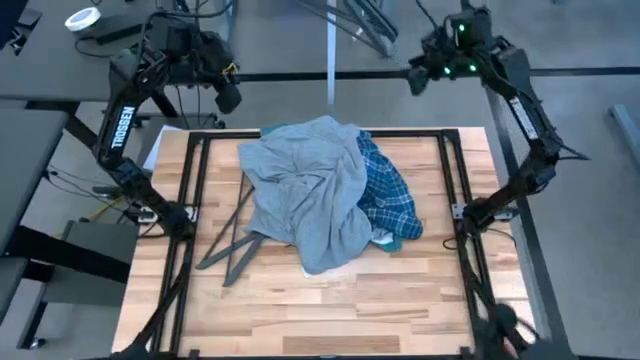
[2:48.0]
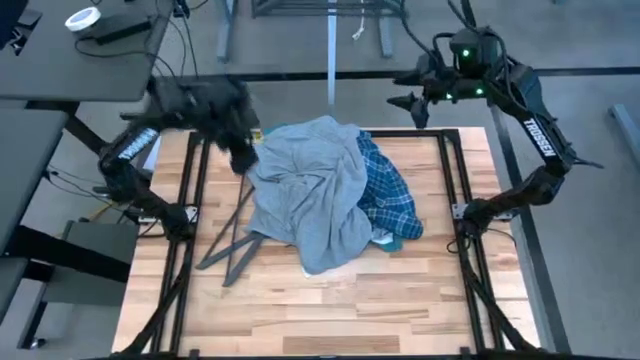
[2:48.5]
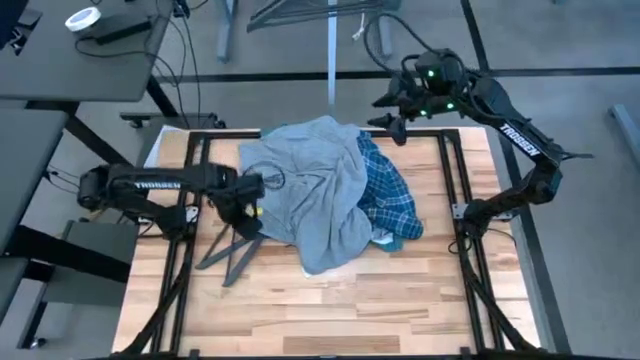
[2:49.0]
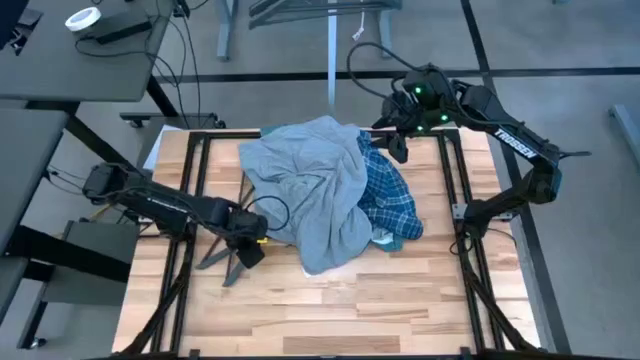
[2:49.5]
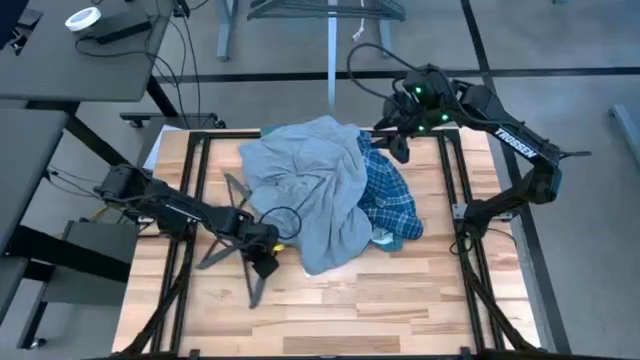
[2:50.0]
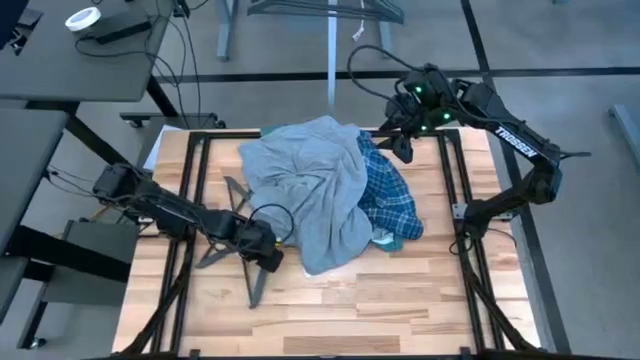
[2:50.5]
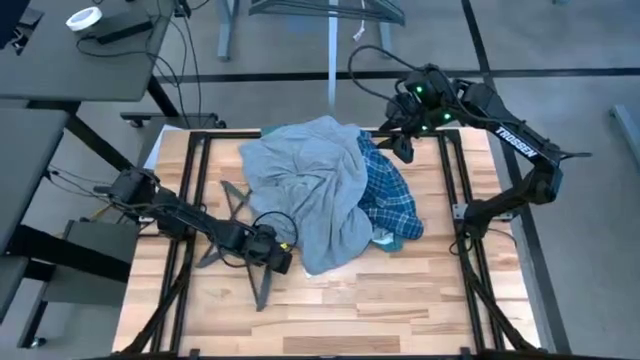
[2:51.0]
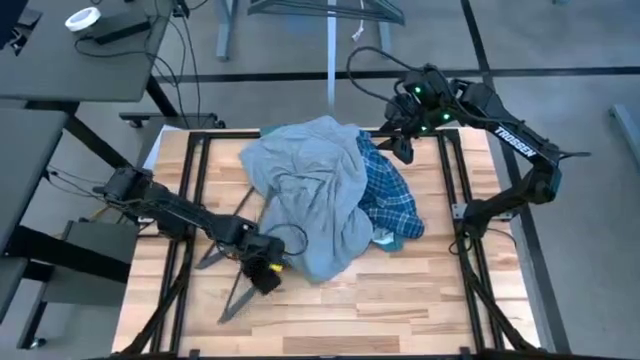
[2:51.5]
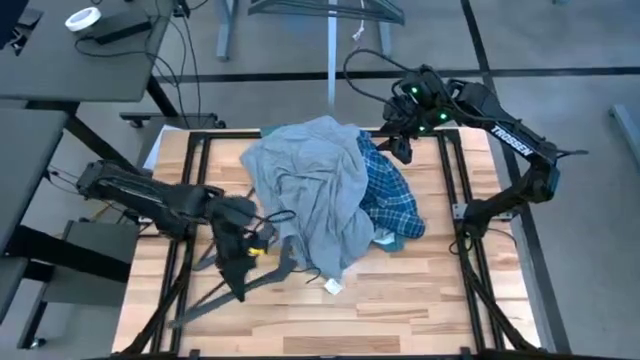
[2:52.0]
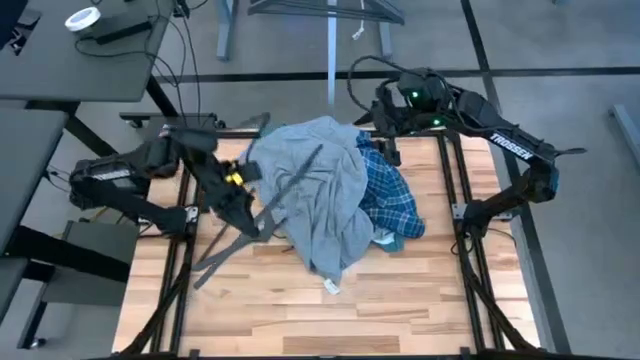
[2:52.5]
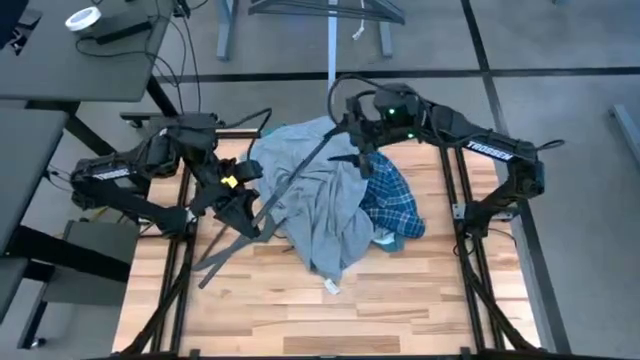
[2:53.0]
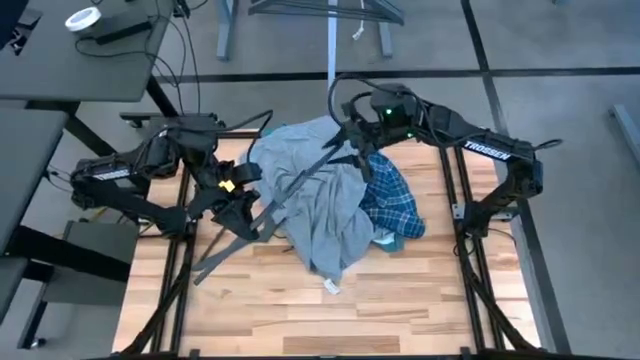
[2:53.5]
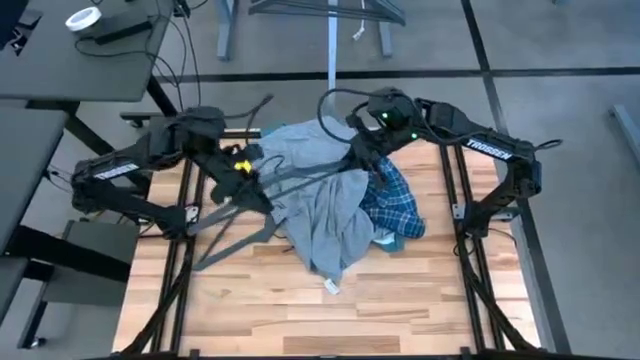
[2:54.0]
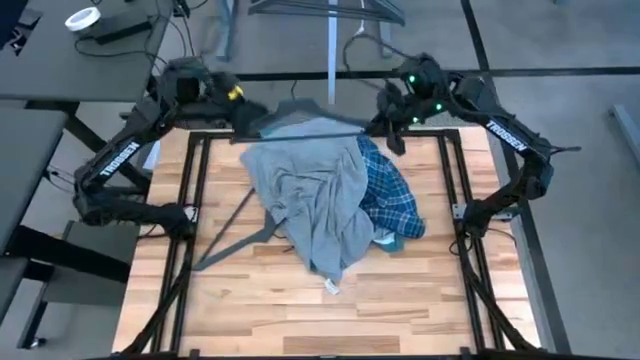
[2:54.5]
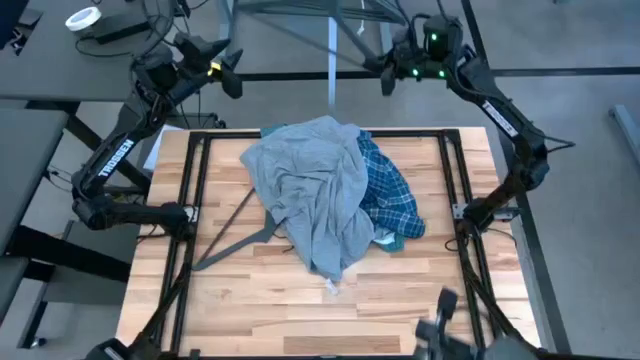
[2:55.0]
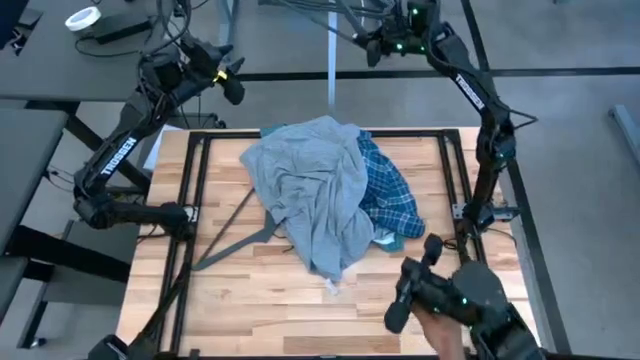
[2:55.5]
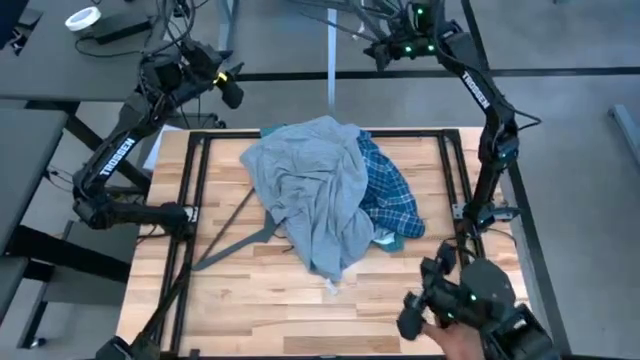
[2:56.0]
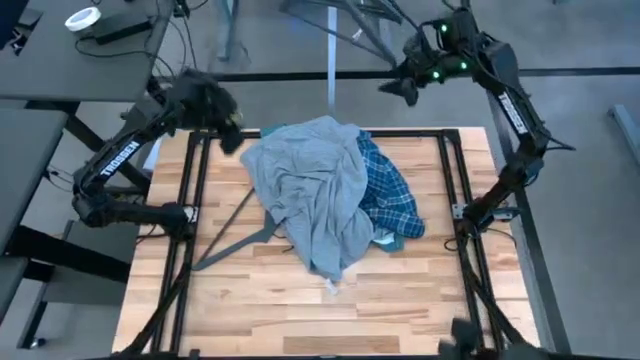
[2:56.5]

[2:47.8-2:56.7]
Task: Hang clothes
Hang the gray hanger on the hanger rack

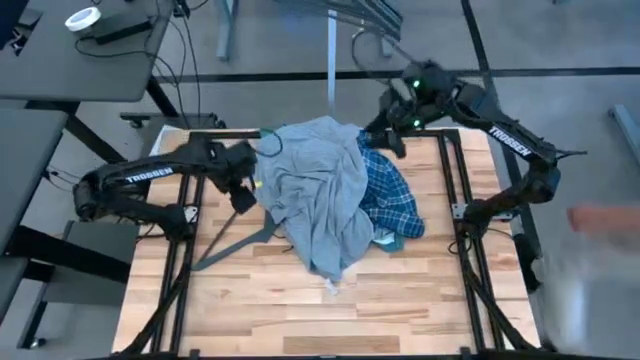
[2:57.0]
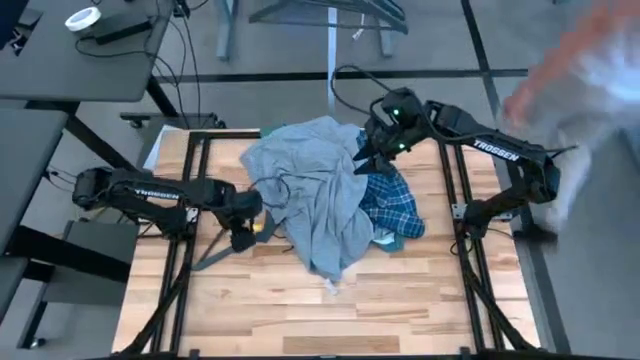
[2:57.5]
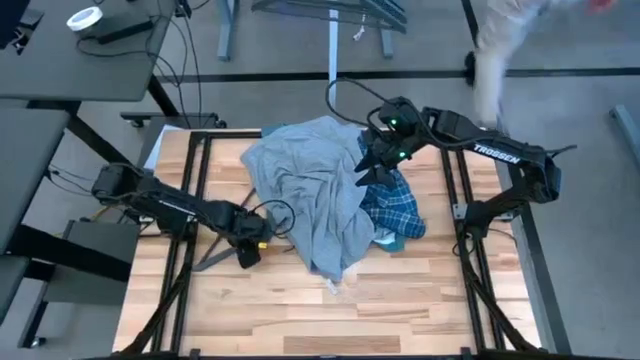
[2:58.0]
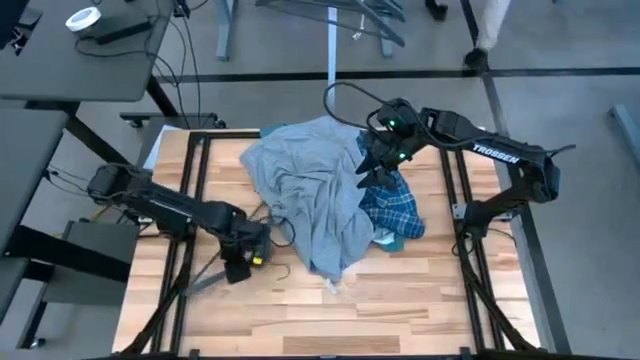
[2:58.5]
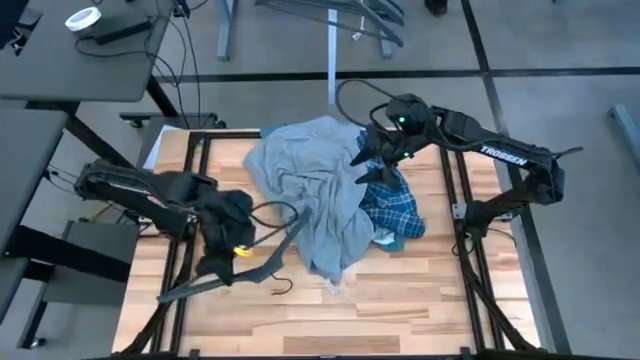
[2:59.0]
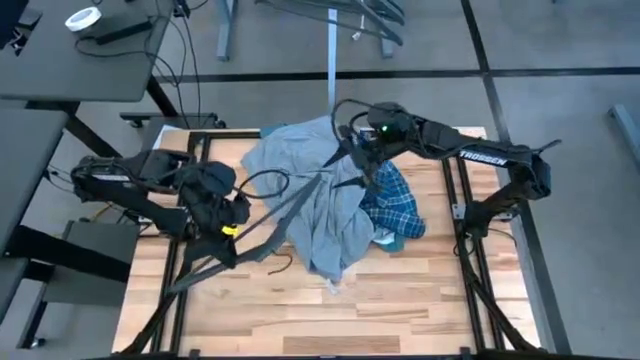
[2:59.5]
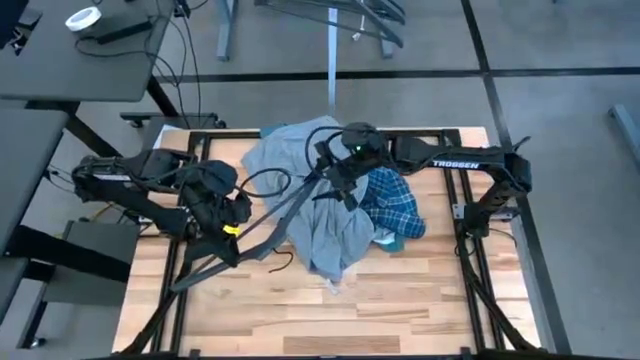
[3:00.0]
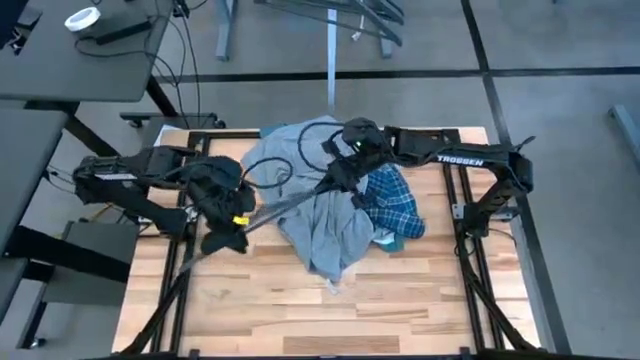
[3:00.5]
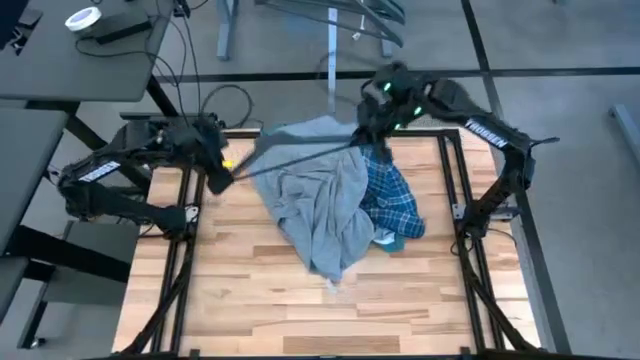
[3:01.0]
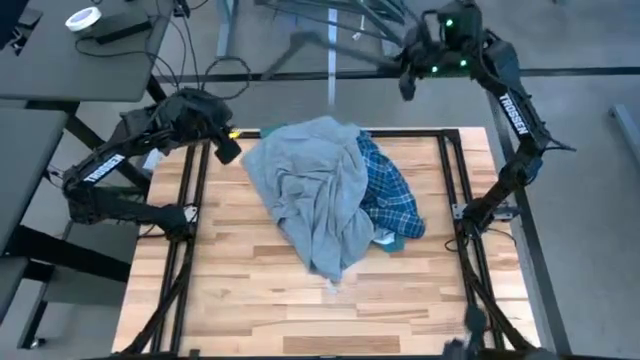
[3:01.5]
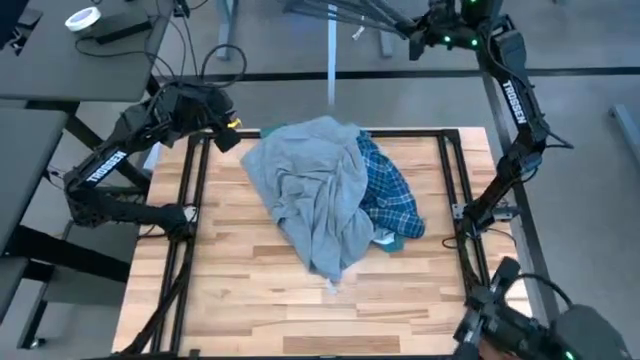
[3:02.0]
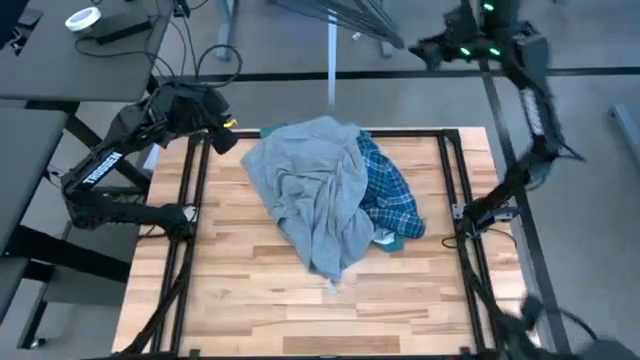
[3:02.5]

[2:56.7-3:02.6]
Hang the gray hanger on the hanger rack

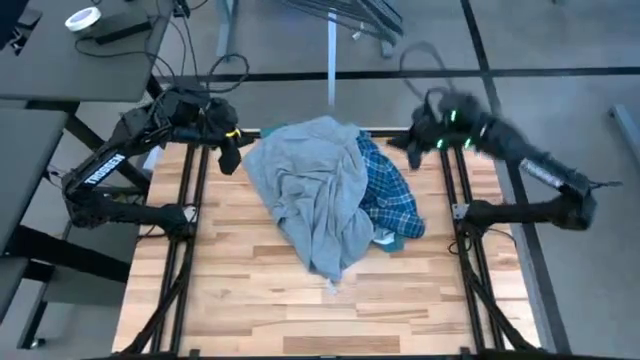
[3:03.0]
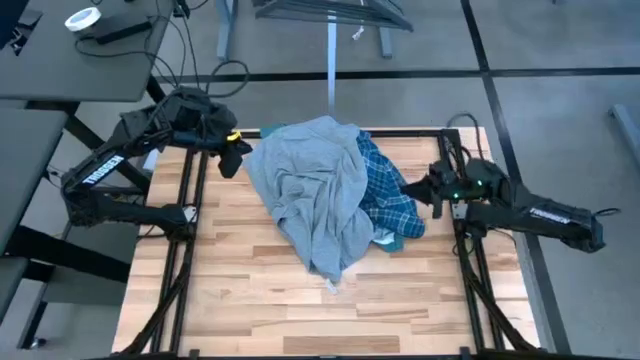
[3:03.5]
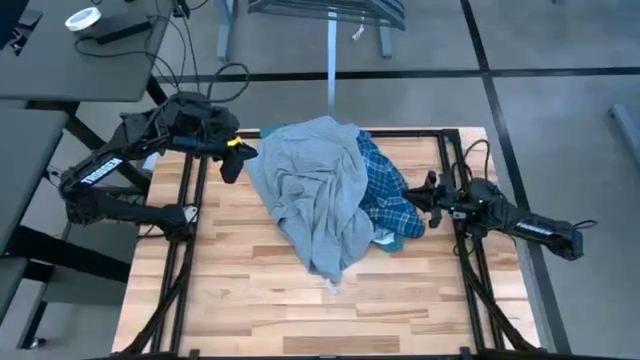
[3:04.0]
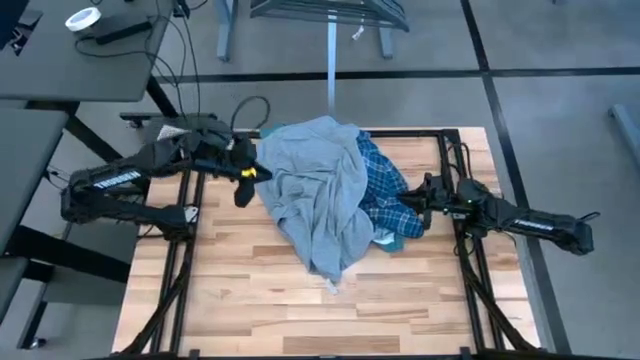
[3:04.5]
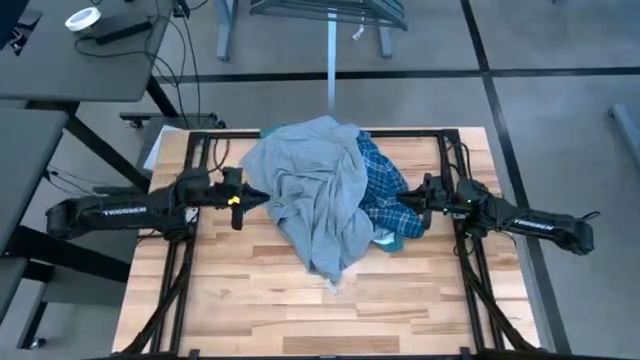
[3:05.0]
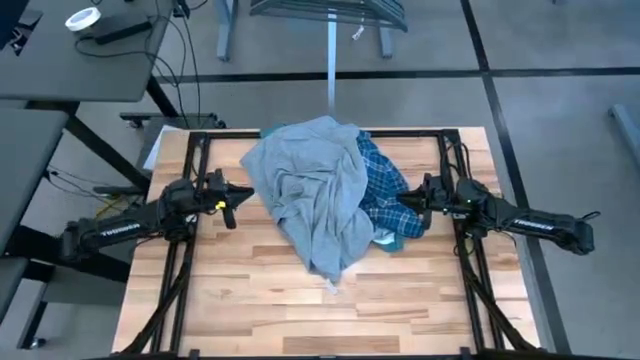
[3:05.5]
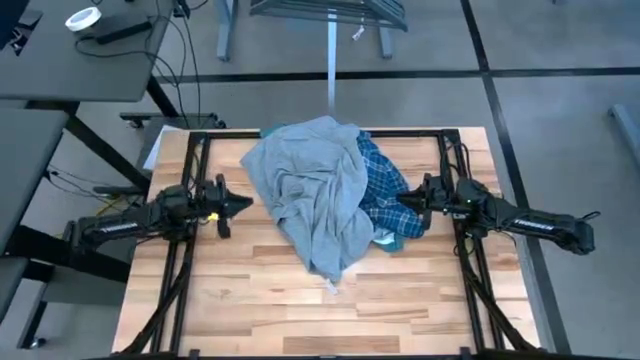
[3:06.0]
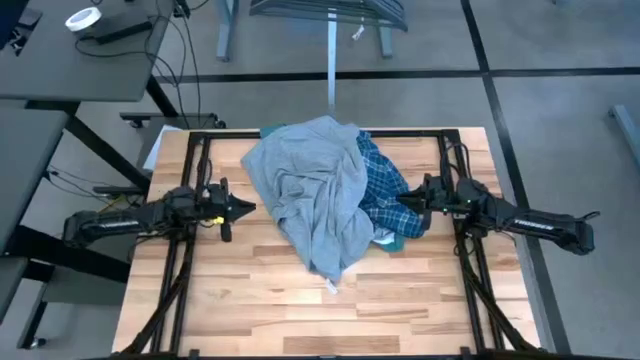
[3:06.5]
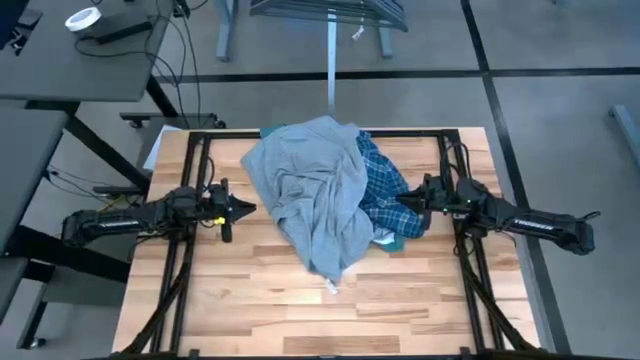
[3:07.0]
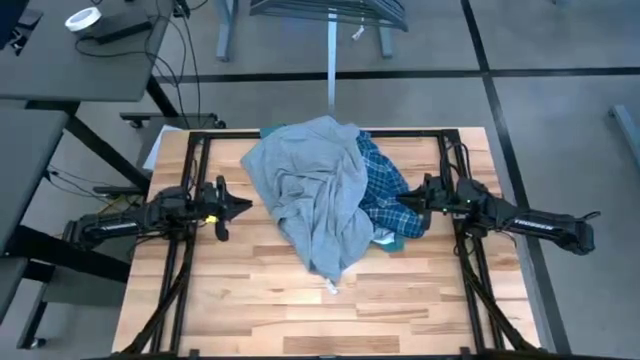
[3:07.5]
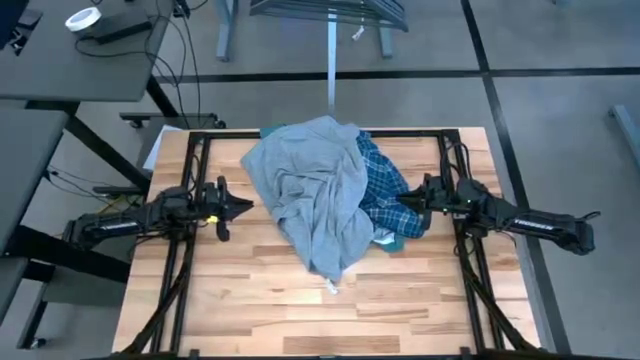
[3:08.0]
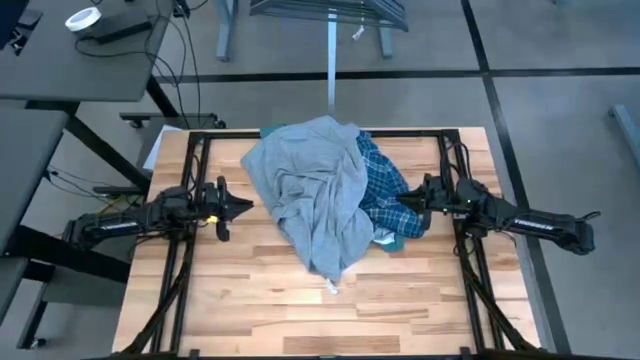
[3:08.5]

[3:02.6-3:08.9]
Return to Home Position
